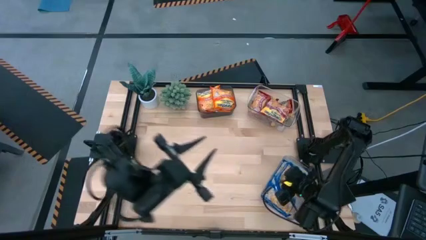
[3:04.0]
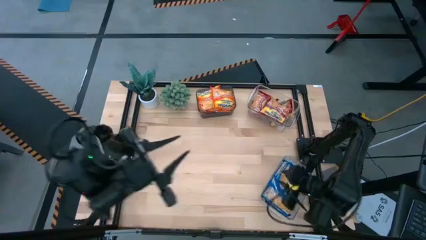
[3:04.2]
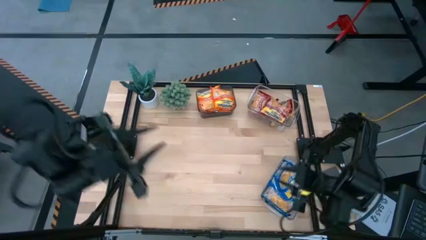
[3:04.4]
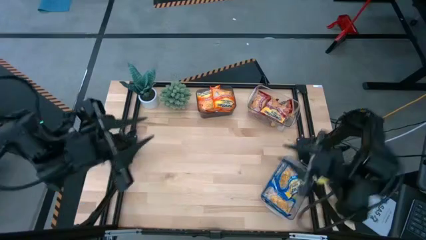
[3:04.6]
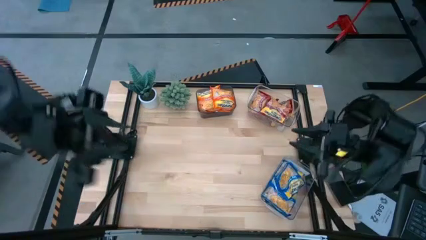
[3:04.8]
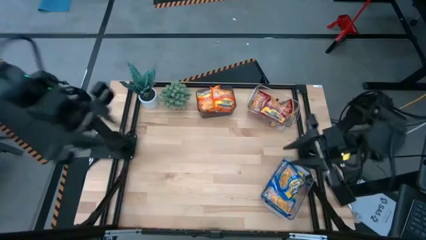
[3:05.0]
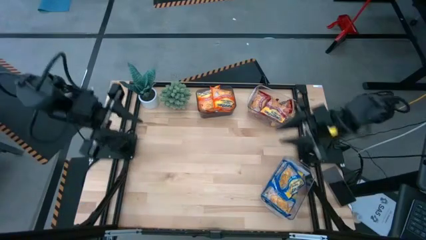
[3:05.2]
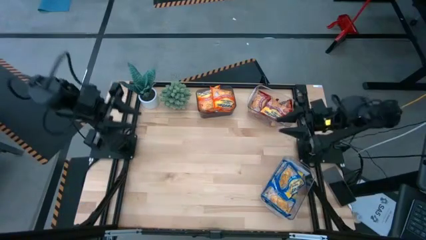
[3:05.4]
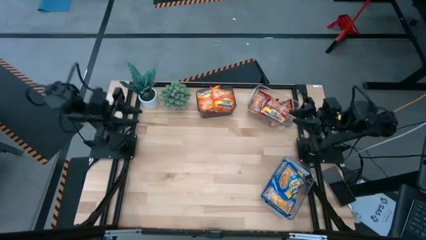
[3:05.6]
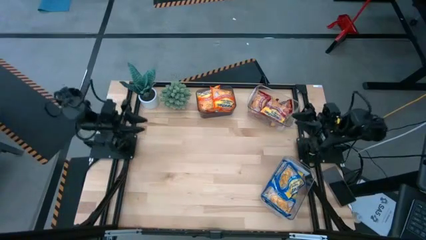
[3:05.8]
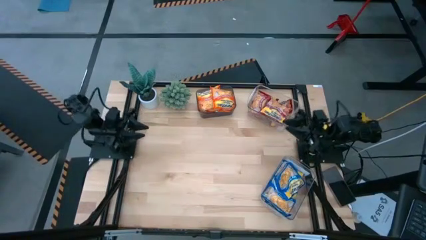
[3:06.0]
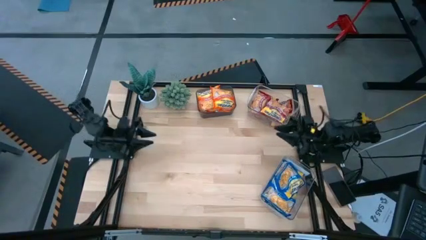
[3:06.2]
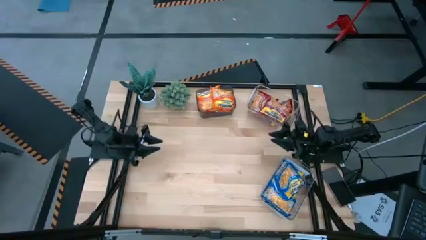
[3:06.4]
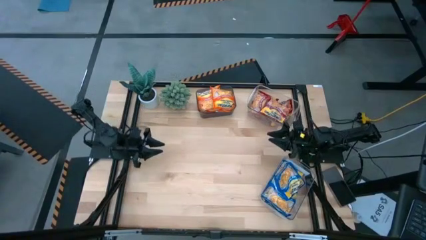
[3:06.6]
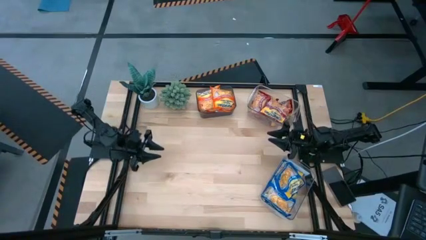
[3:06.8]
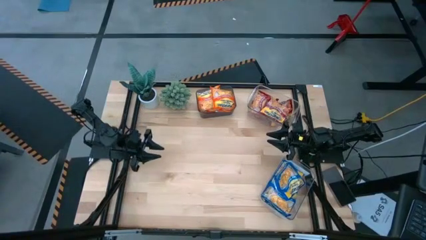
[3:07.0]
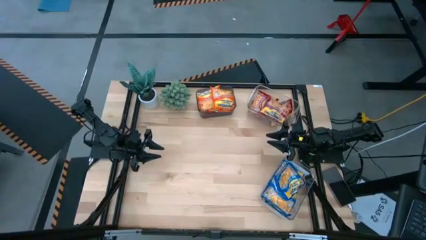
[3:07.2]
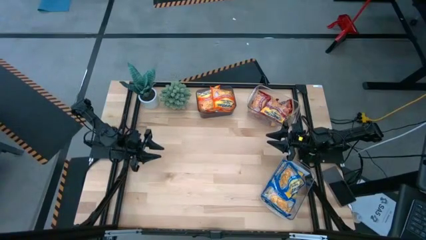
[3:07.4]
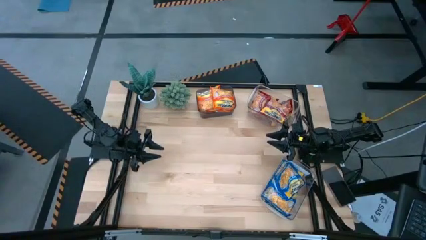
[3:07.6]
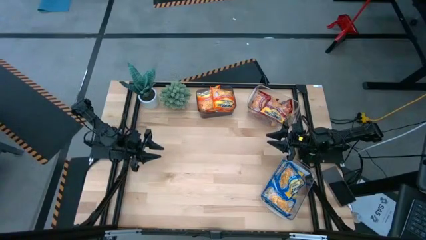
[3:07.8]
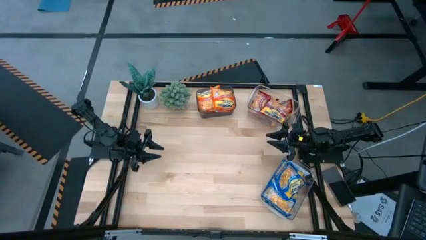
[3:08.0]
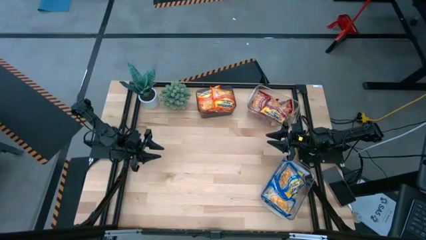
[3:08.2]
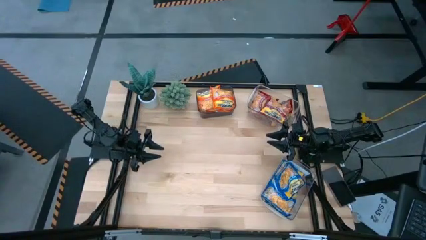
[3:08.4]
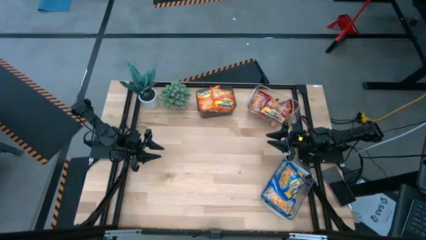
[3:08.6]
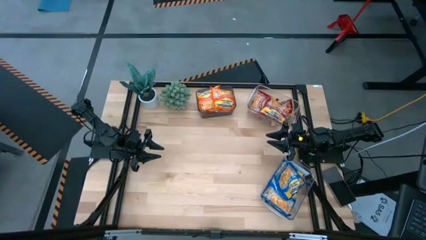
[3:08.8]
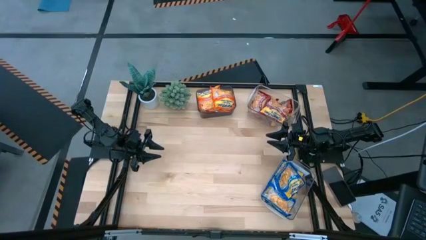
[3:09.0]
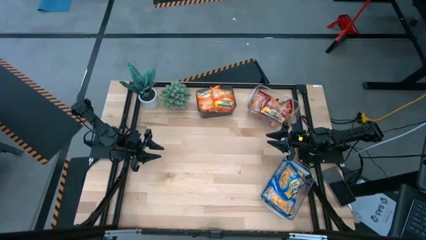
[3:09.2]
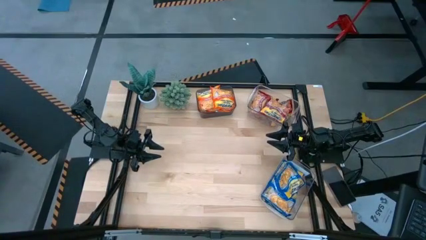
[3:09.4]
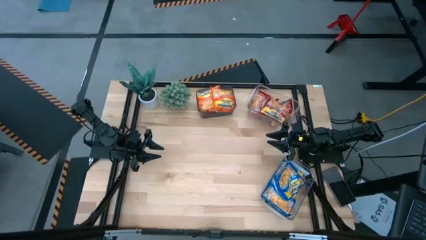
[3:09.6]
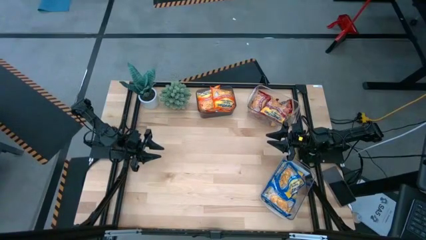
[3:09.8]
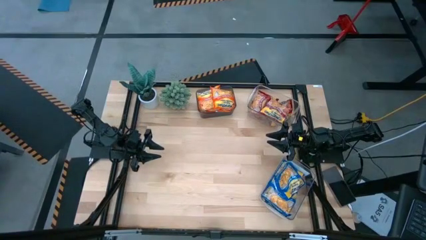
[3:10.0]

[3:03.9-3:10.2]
Task: Sort Maruchan noodles
Return to Home Position

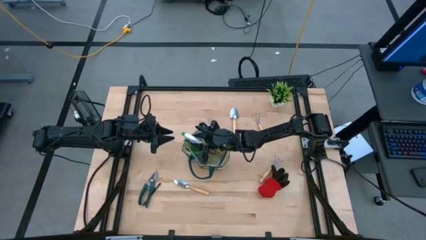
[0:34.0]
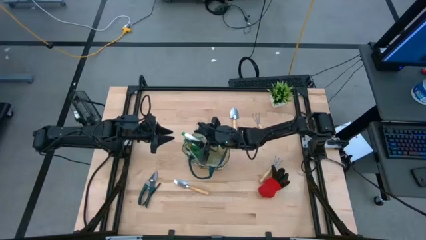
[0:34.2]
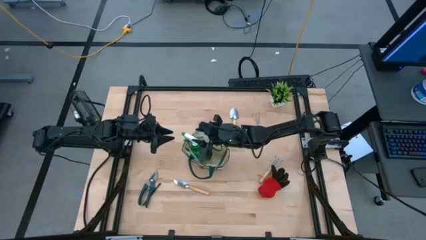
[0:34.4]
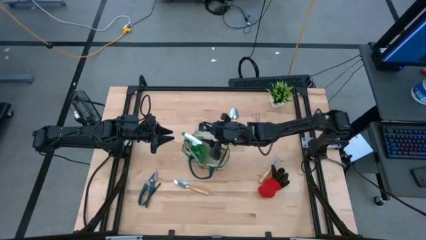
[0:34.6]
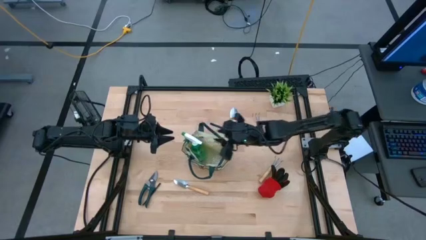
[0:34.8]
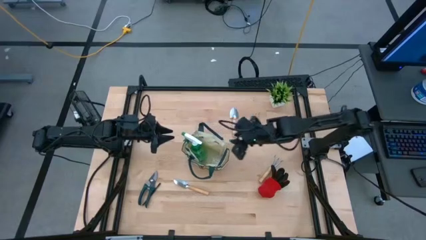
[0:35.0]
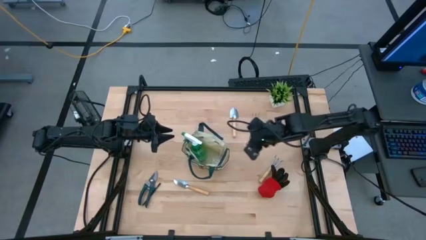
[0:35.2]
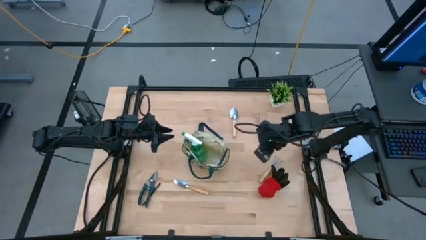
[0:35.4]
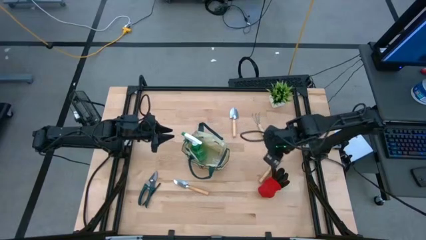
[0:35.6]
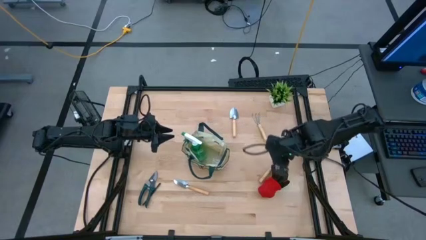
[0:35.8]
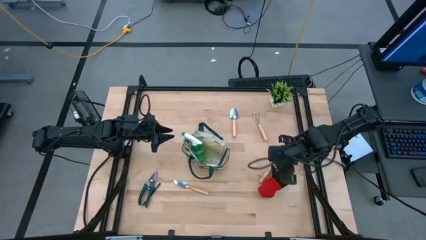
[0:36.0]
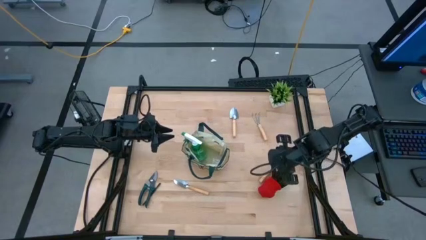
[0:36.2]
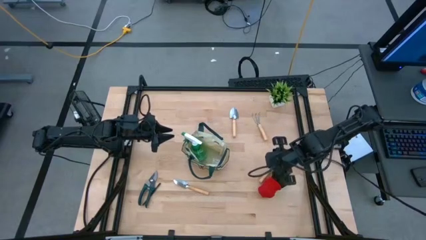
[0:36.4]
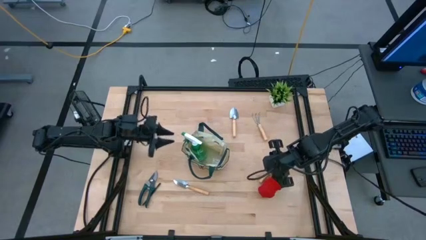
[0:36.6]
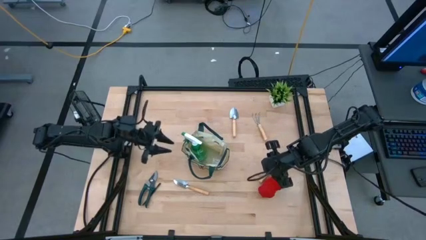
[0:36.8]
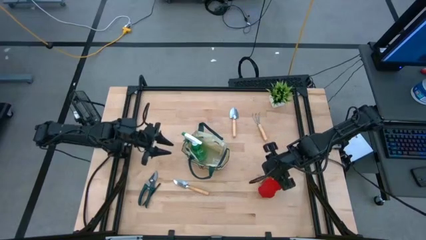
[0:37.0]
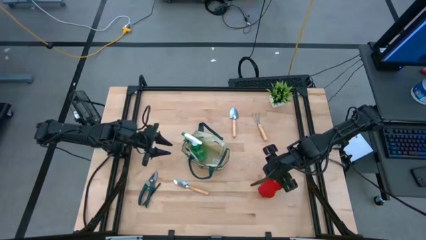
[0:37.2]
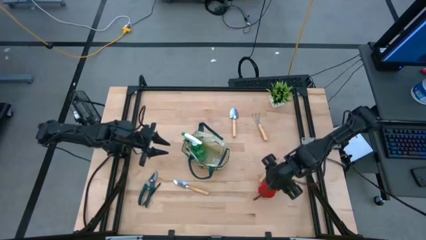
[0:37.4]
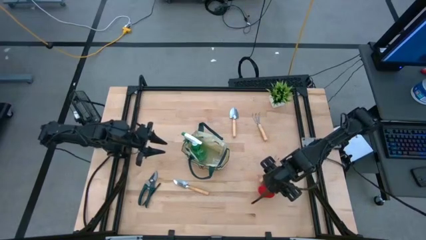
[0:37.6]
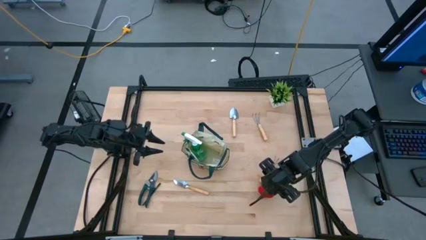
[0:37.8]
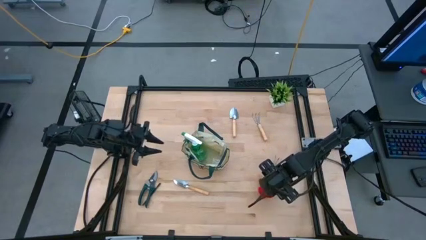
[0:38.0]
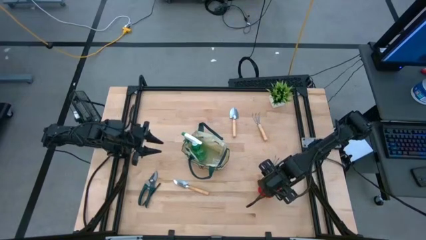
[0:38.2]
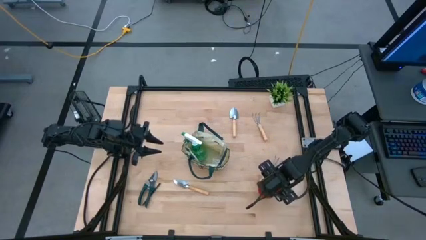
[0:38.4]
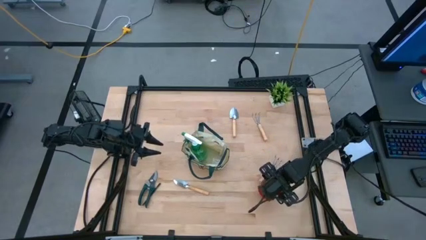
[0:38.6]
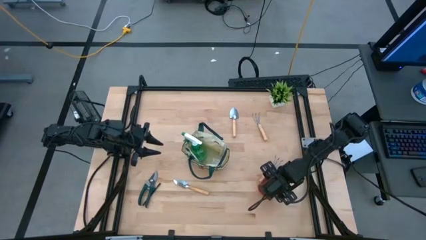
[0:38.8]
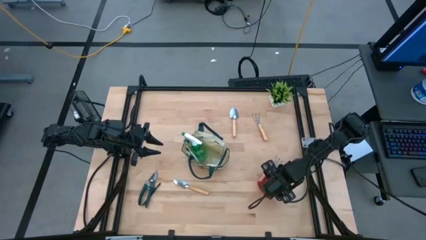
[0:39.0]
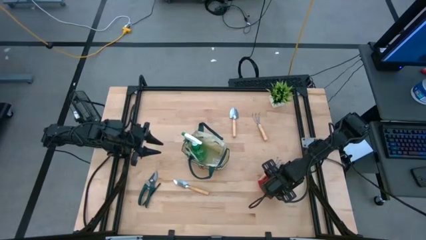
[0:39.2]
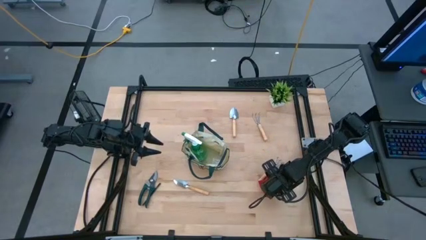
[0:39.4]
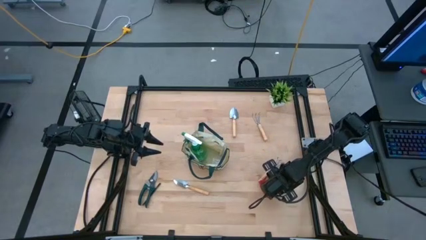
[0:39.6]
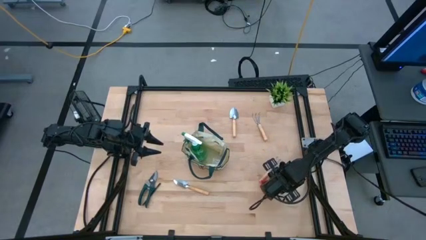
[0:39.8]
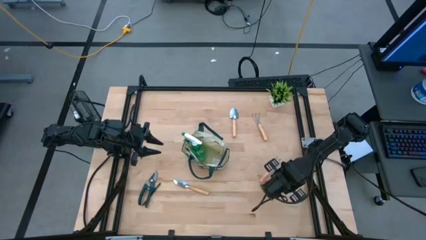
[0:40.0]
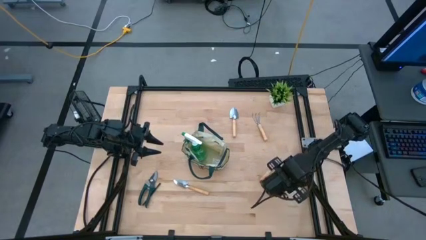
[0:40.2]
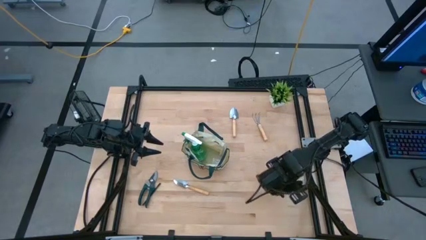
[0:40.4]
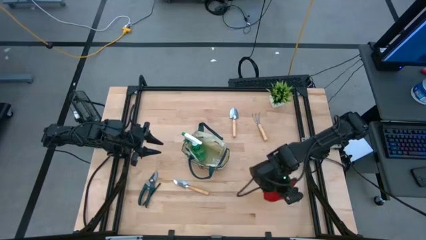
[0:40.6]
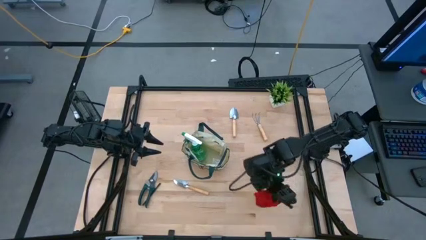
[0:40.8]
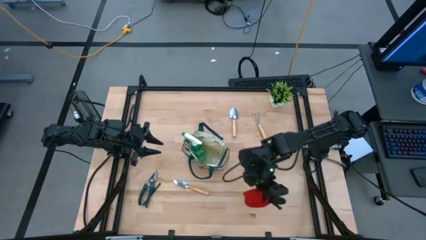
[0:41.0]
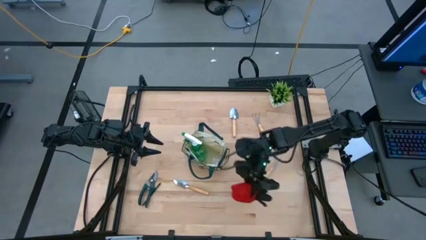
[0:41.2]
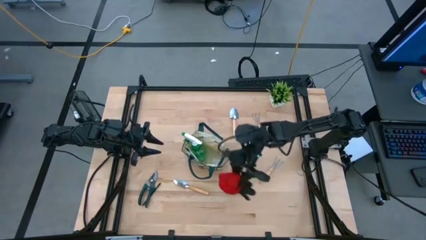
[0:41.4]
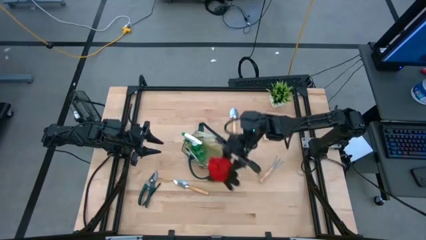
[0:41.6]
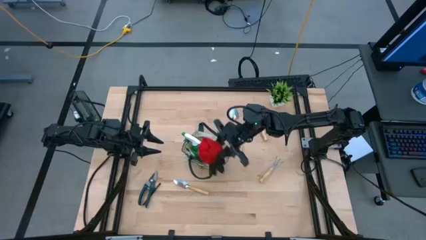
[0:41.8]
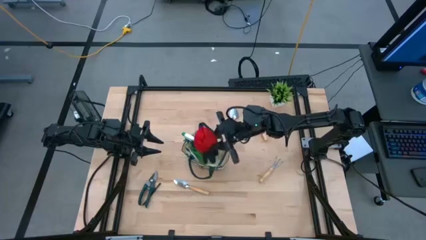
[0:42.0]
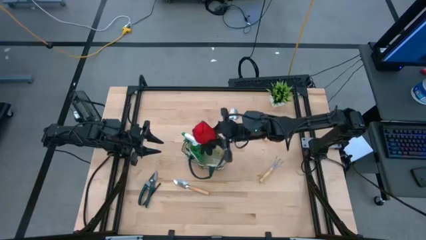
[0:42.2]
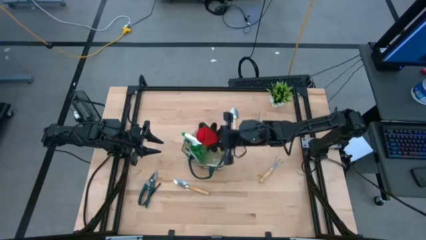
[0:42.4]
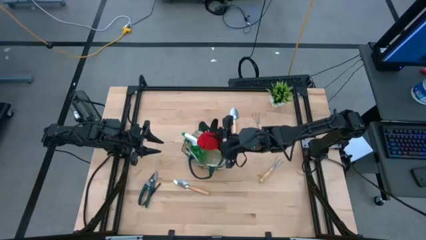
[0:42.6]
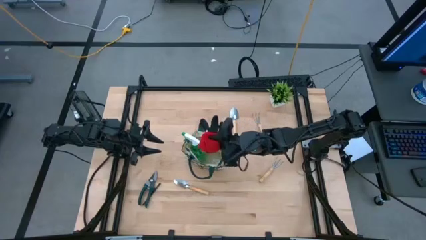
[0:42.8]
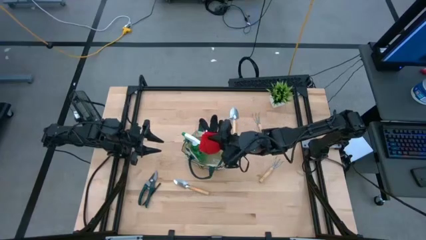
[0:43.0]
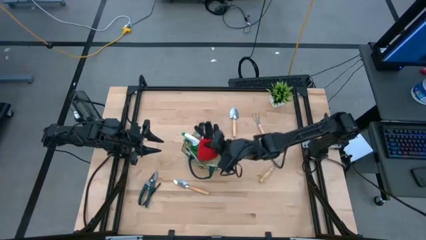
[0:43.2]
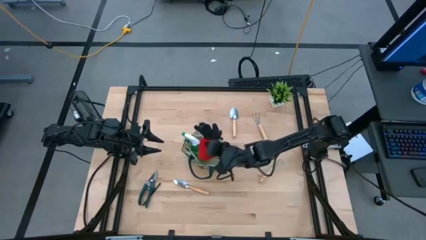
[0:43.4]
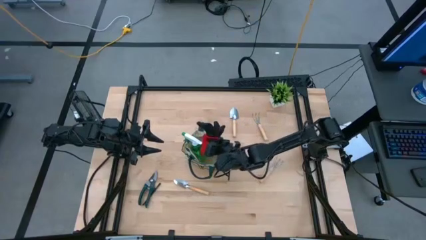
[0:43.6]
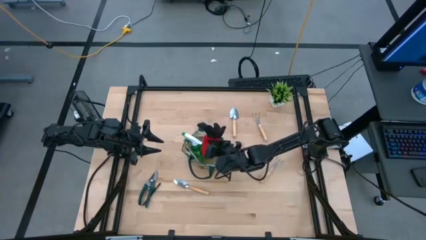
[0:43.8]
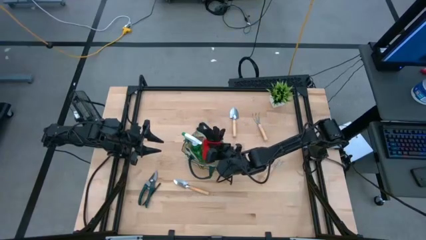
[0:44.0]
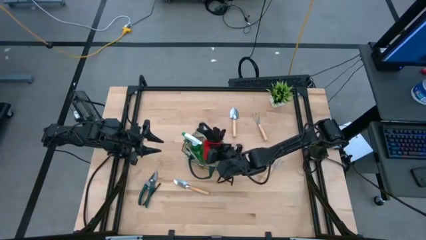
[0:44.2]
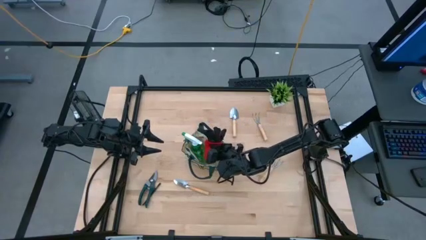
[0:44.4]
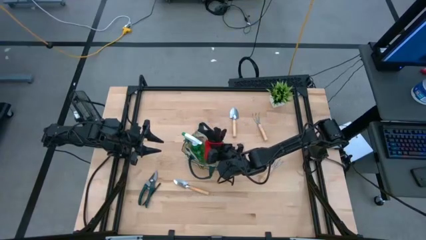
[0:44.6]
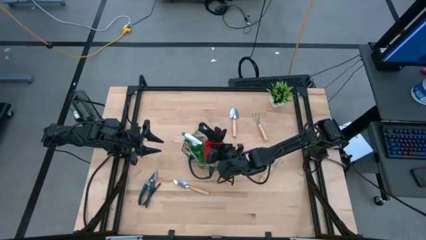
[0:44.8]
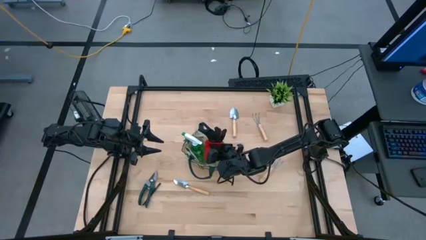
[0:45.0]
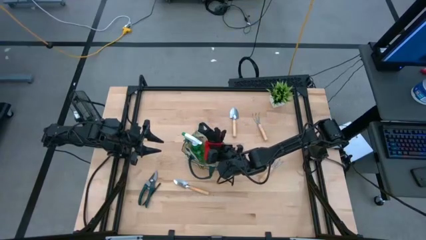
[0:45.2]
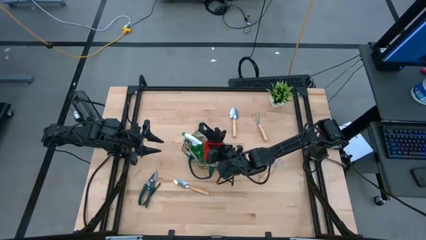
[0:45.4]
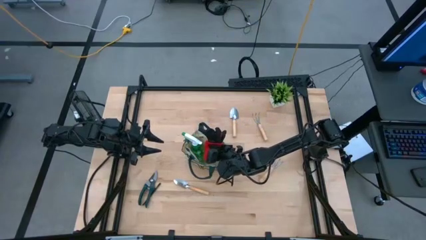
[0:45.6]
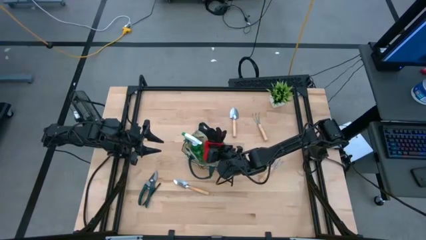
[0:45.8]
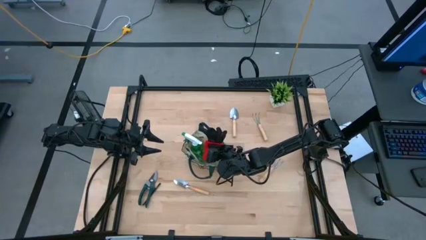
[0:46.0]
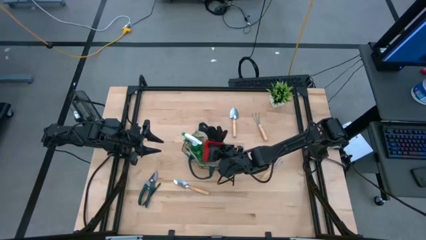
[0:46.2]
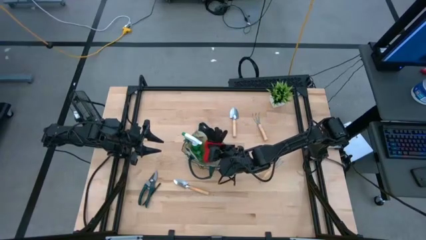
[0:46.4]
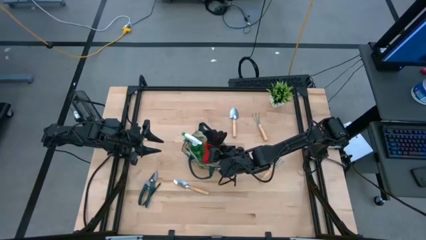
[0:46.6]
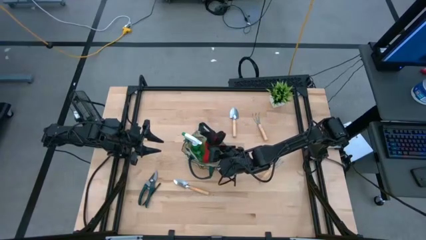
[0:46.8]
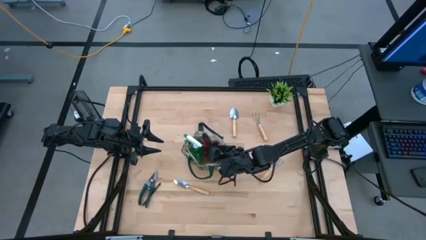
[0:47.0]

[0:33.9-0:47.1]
Task: Pick & Place Garden tools in Gardening bag
Put the red gloves into the gardening bag
